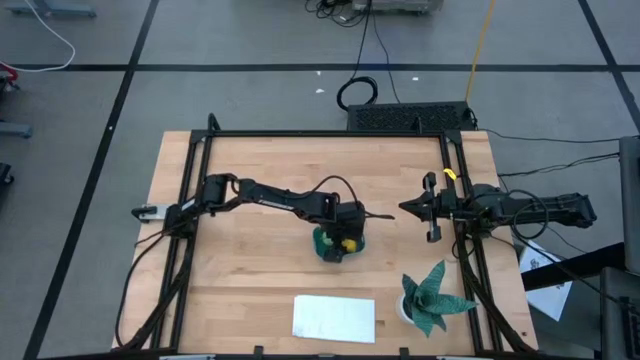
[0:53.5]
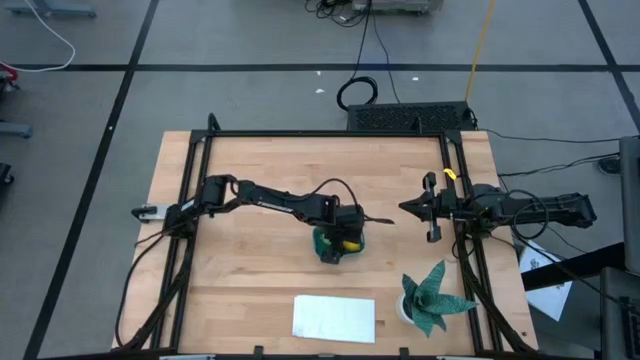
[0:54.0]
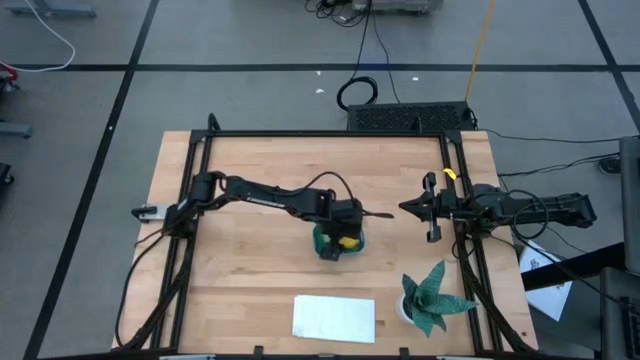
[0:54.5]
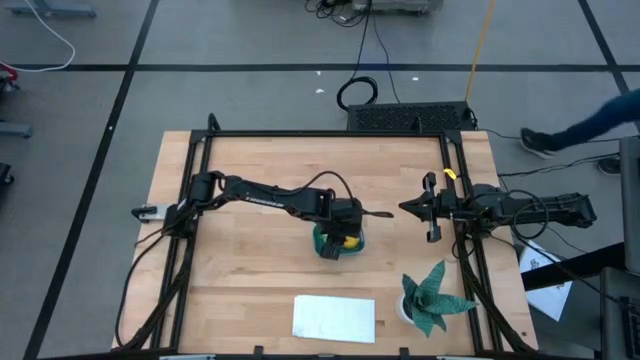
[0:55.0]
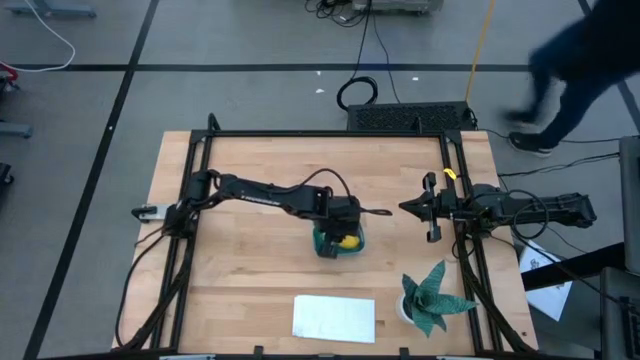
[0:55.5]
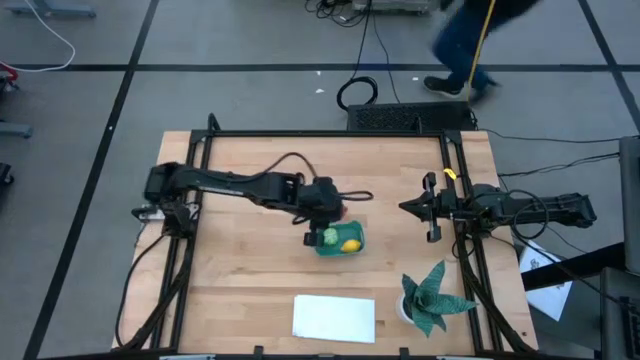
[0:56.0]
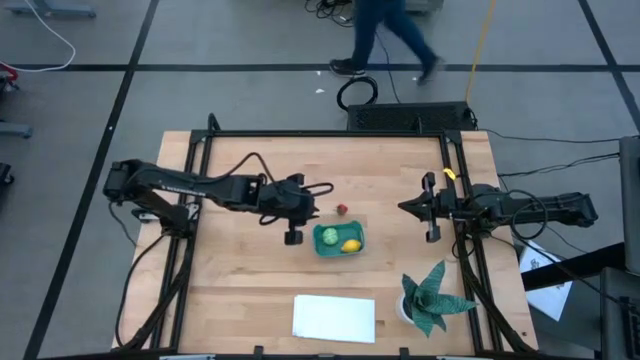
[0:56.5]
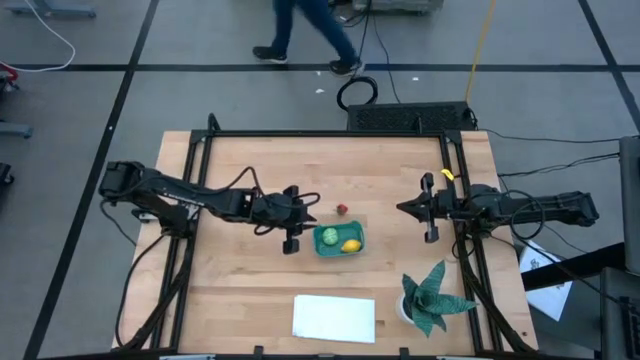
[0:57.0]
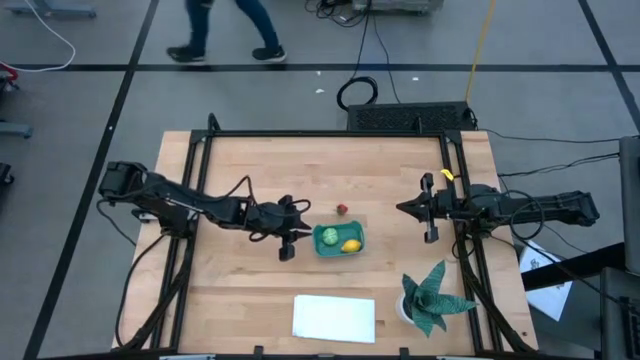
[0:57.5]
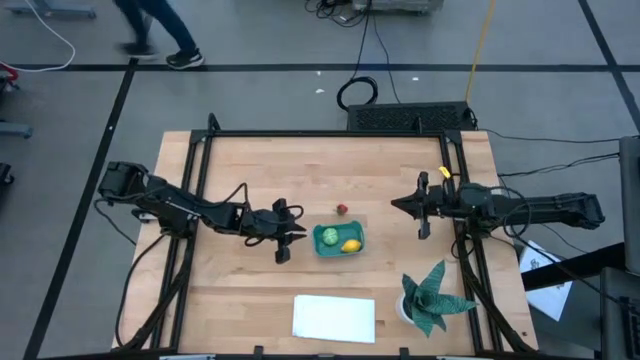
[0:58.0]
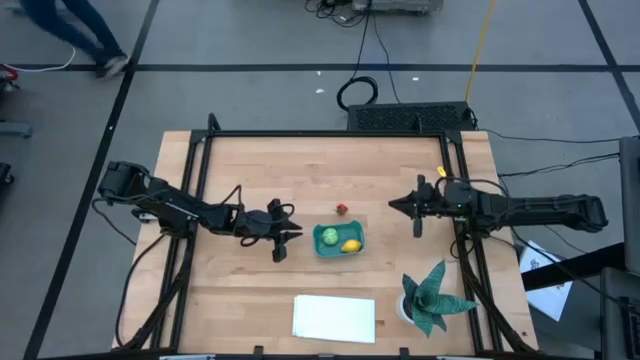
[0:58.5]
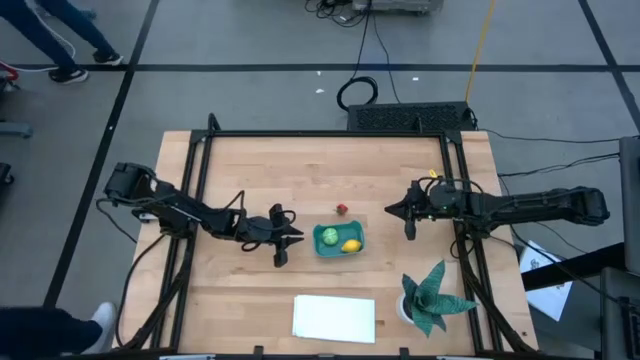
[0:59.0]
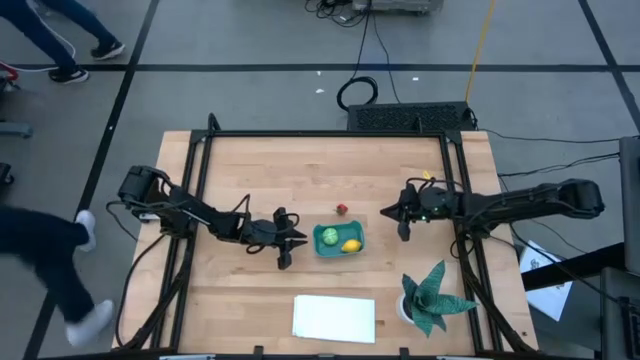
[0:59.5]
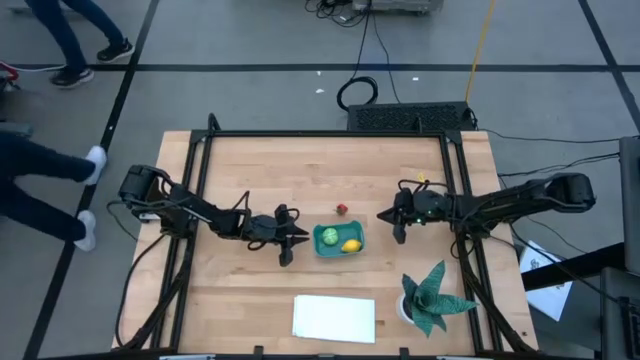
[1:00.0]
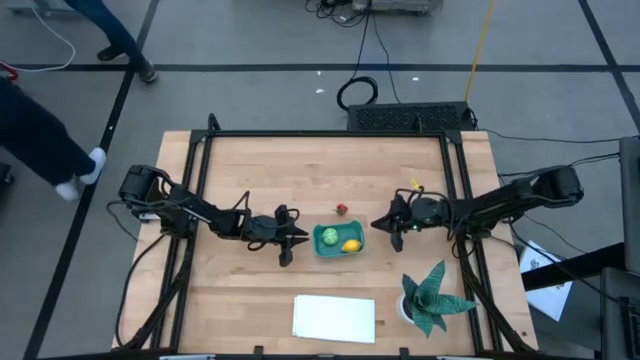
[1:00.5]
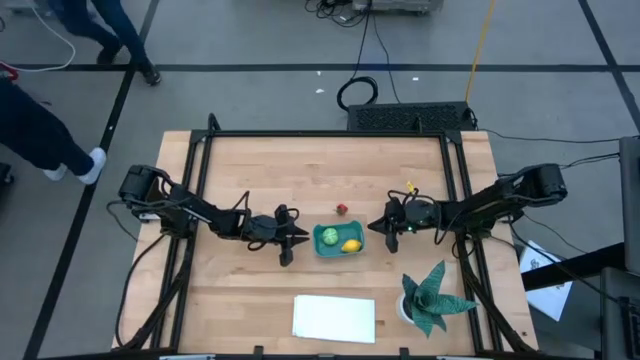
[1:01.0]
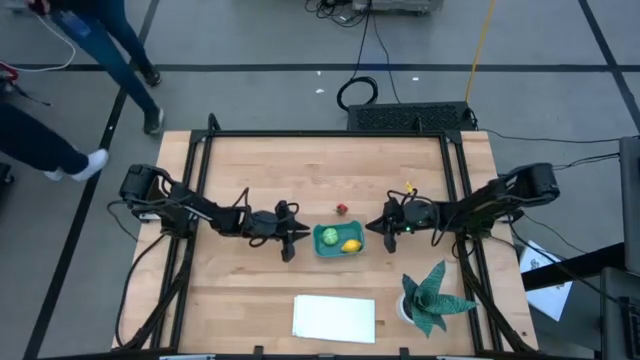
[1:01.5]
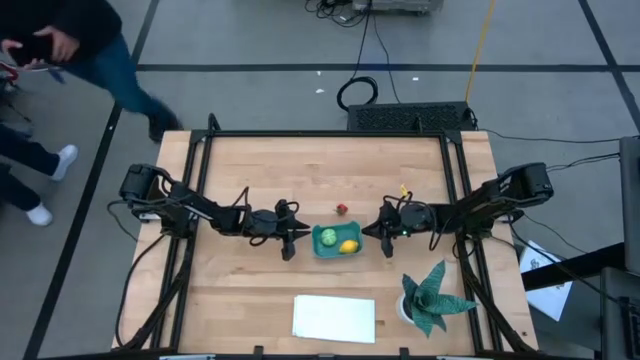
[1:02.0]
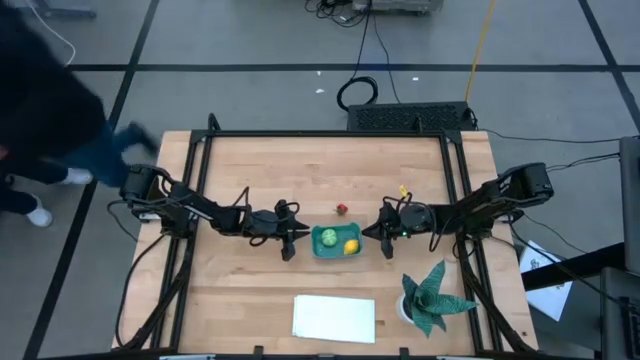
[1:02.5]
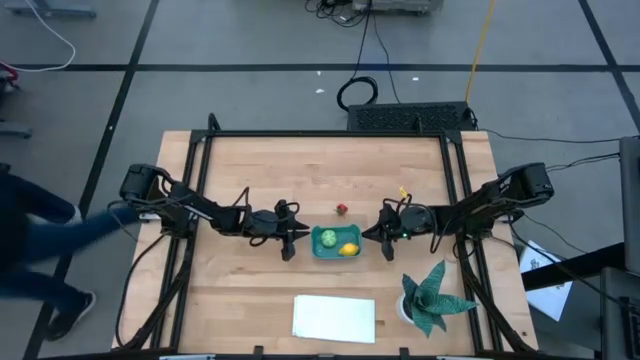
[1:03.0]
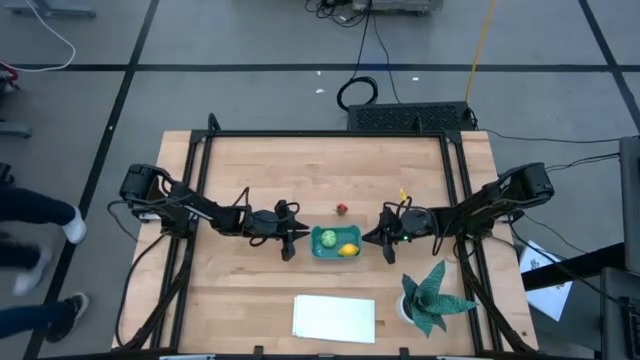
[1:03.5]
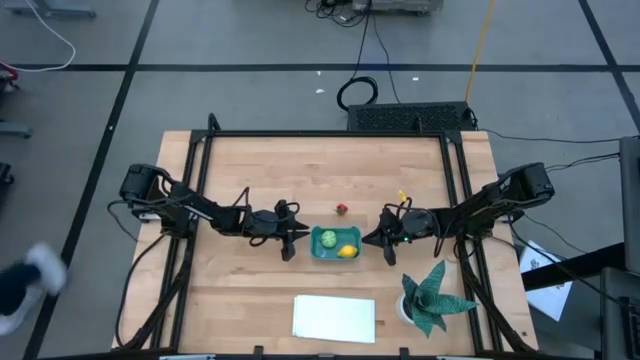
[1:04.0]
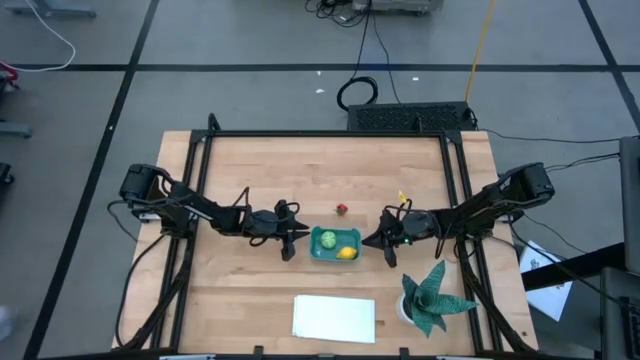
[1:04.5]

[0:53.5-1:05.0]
Task: Pick and placing Produce into tupperware
Adjust the bin on the table

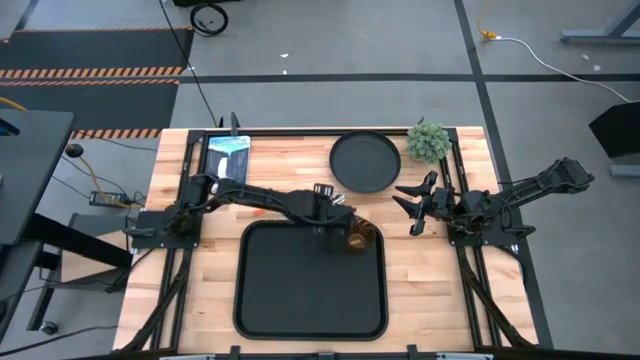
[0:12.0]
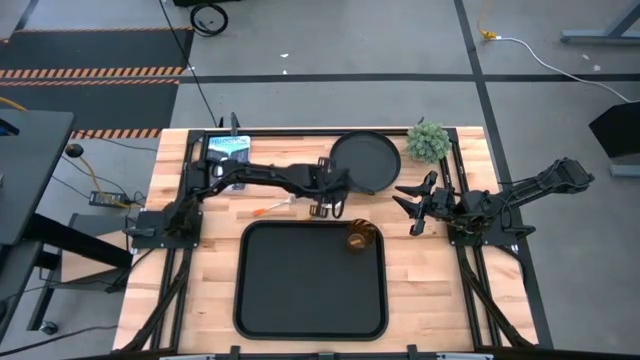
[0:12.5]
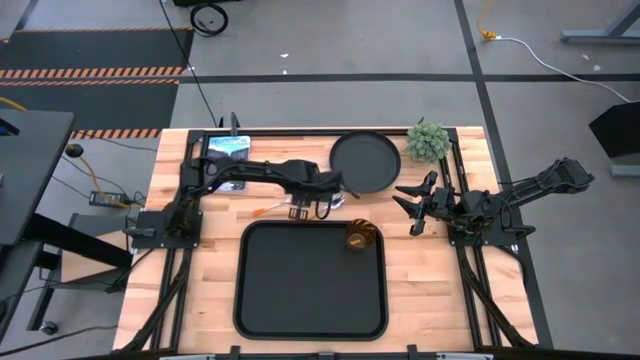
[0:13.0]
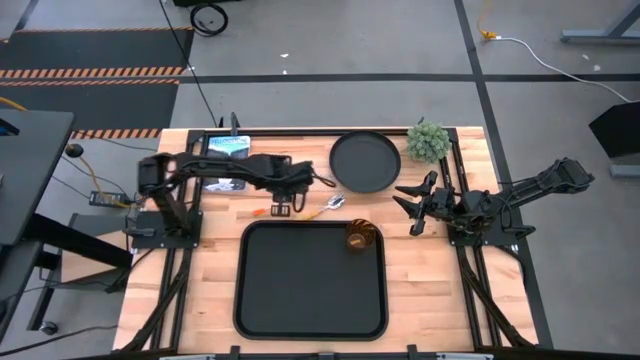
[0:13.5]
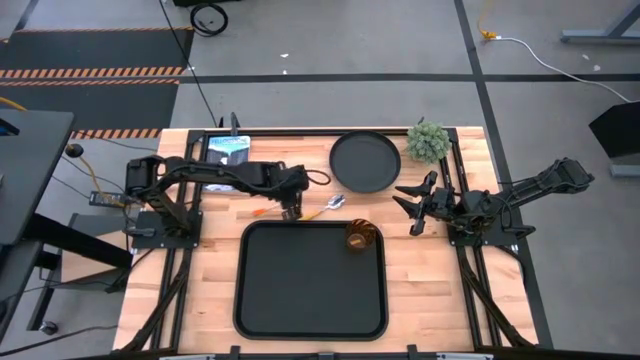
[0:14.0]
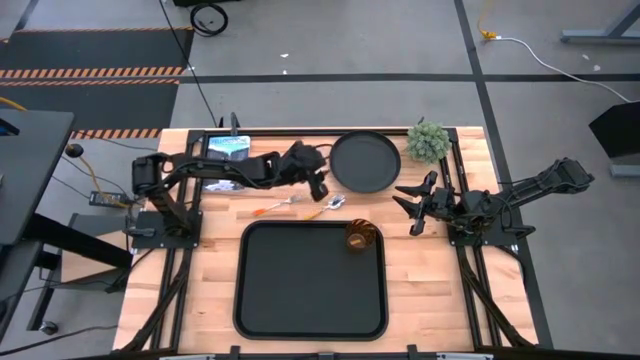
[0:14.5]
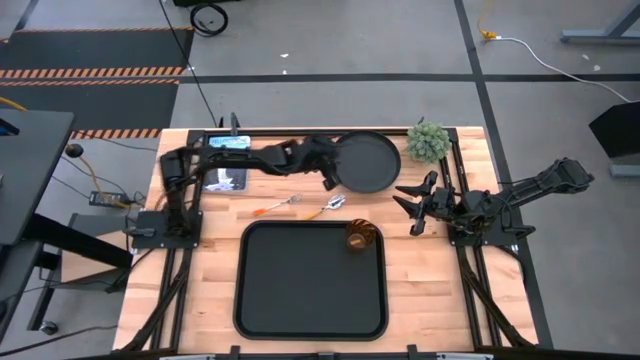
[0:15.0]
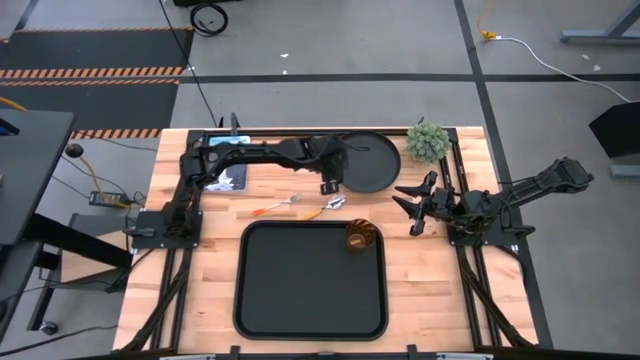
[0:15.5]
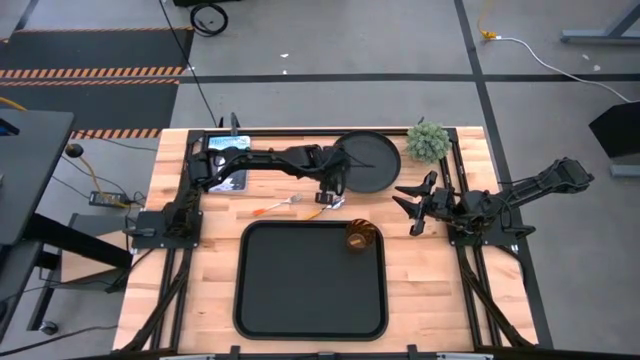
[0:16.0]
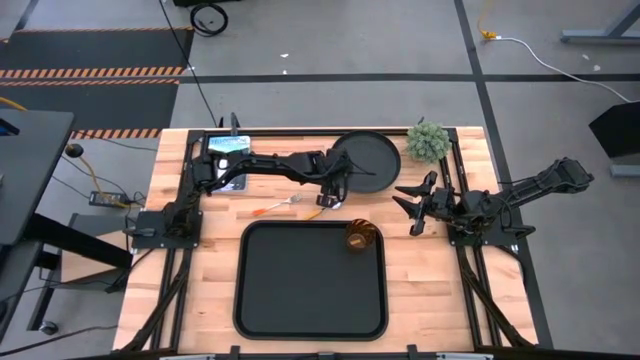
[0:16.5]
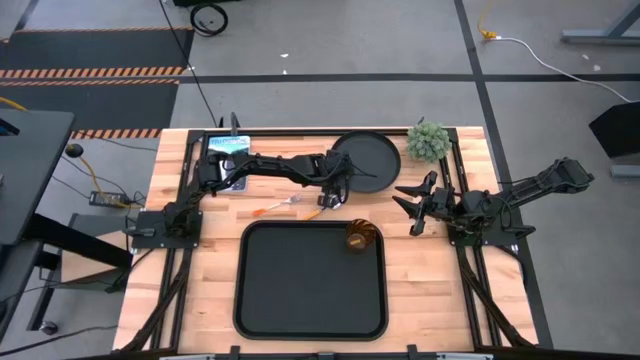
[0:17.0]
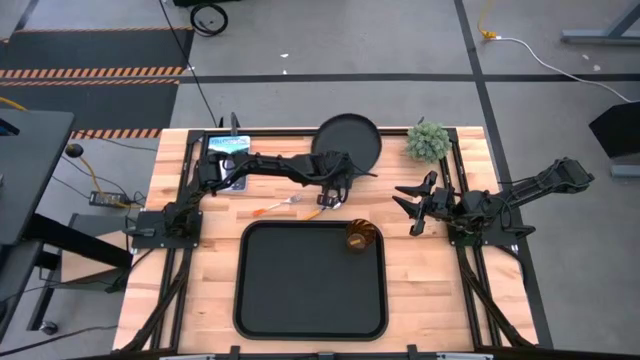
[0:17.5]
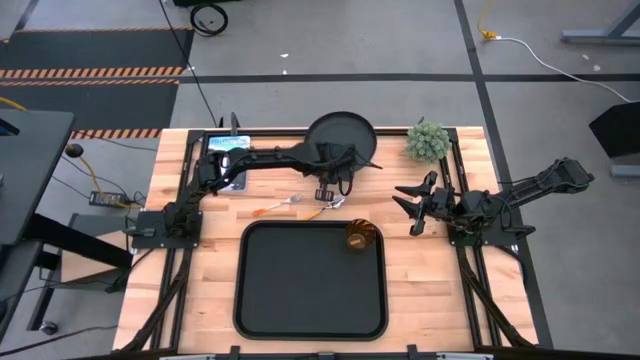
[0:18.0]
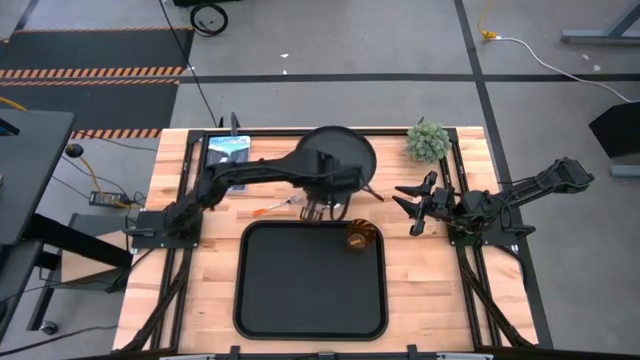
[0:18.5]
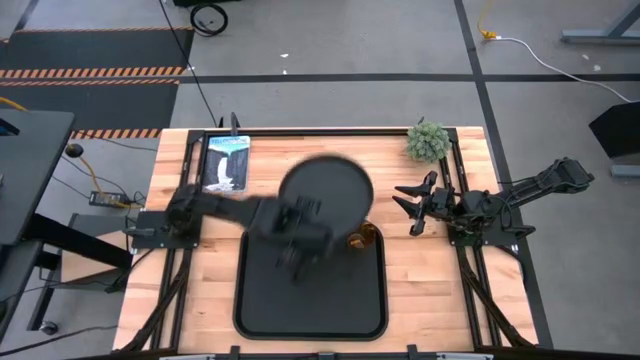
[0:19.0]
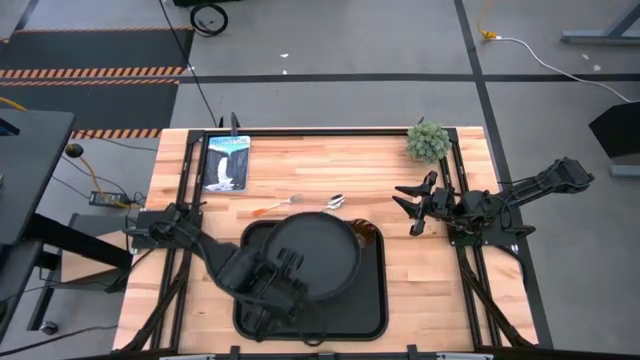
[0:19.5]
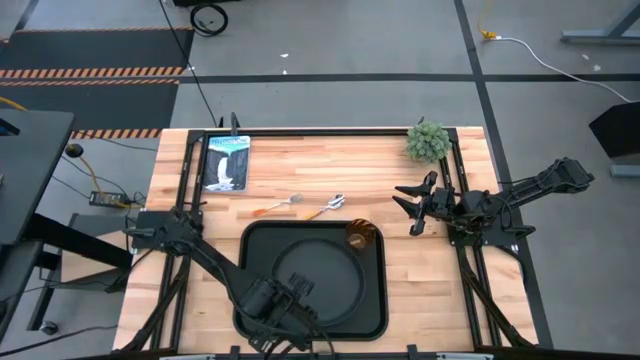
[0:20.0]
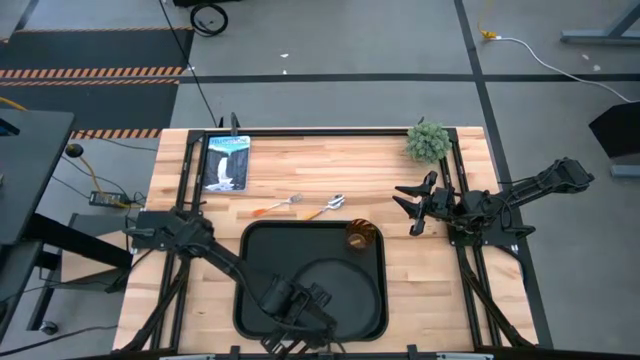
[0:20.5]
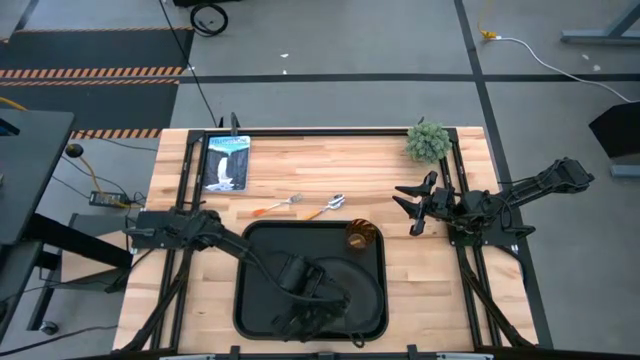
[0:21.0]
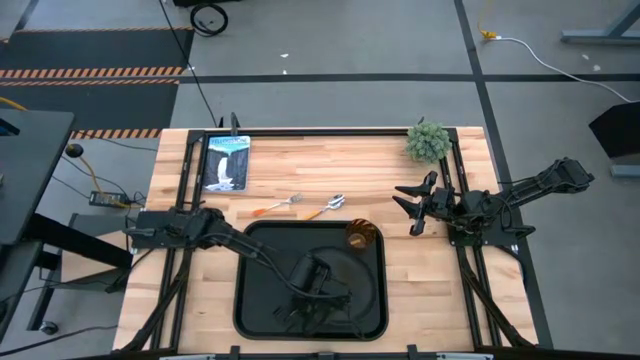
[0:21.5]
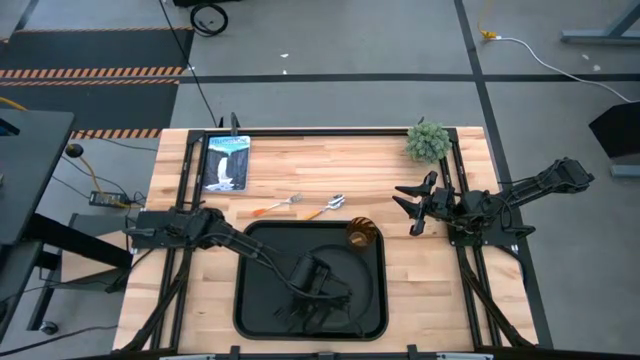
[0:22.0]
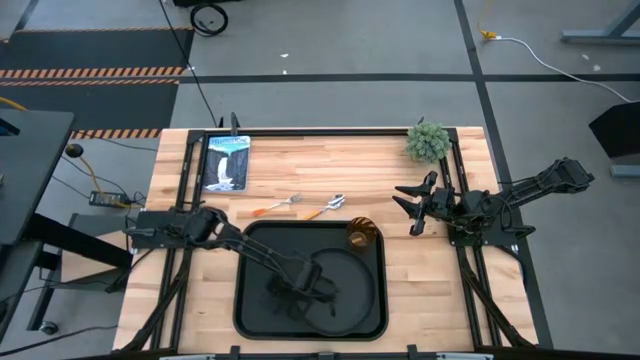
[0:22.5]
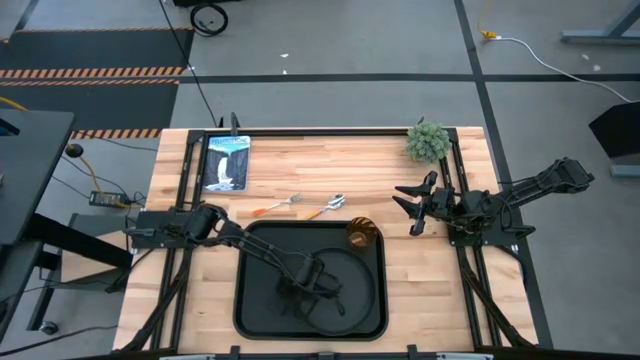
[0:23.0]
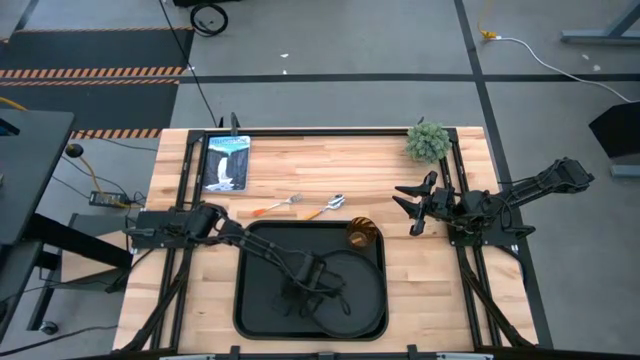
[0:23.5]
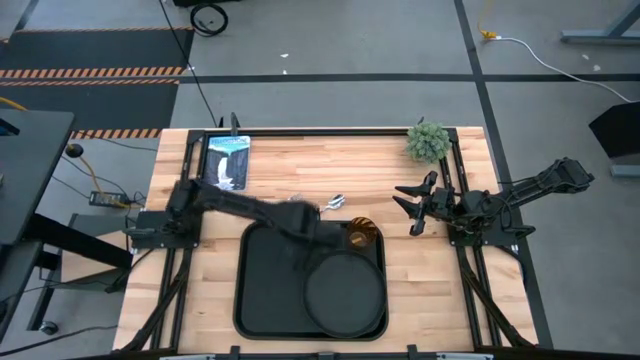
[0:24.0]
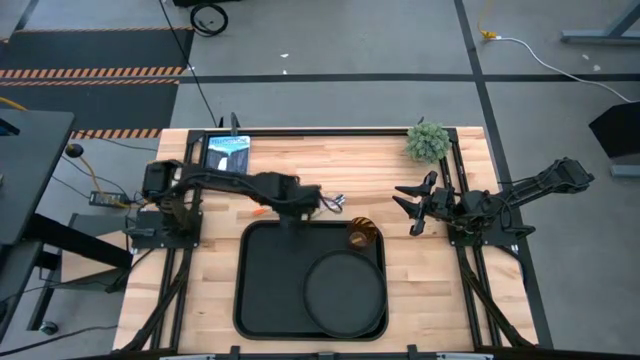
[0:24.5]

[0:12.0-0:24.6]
Task: Pick and place plate/cup/fork/spoon on tray
Put the black plate on the black tray, beneath the orange cup
